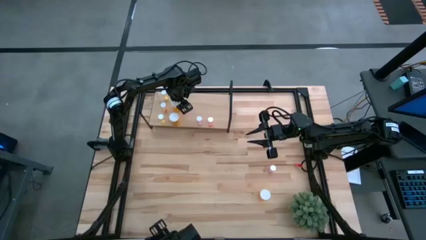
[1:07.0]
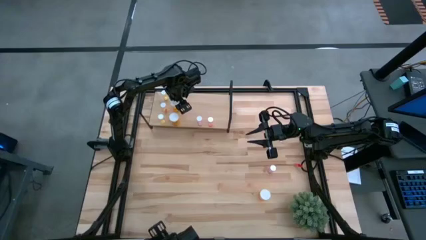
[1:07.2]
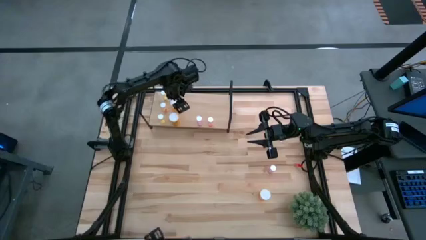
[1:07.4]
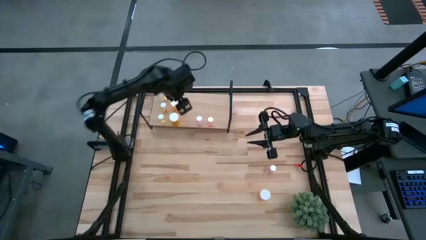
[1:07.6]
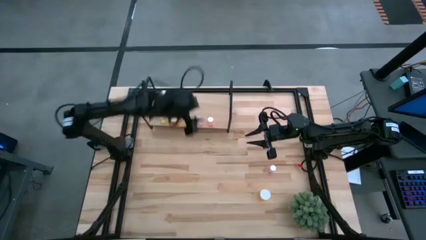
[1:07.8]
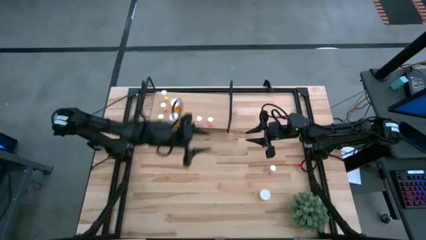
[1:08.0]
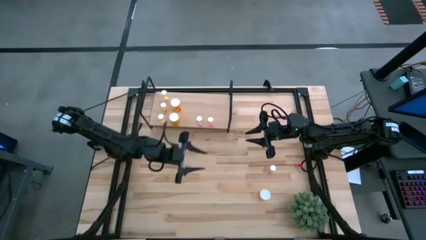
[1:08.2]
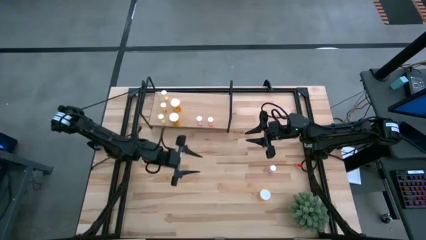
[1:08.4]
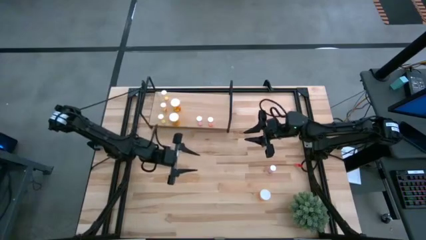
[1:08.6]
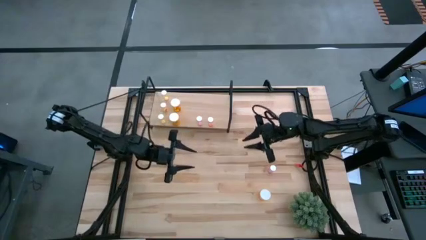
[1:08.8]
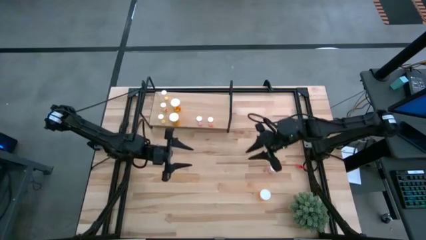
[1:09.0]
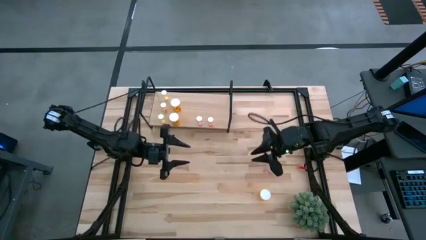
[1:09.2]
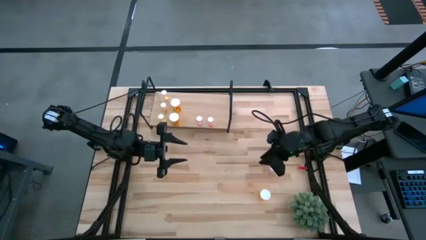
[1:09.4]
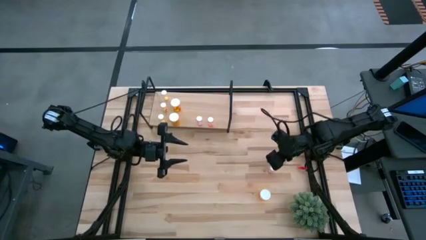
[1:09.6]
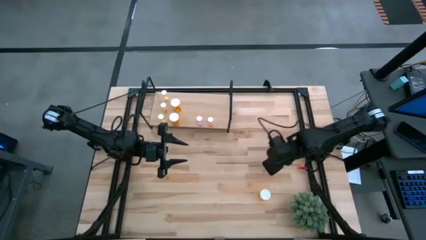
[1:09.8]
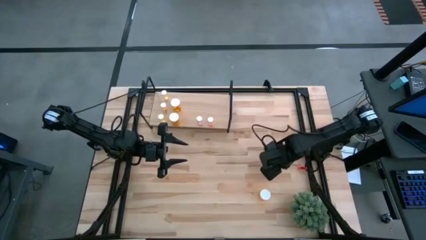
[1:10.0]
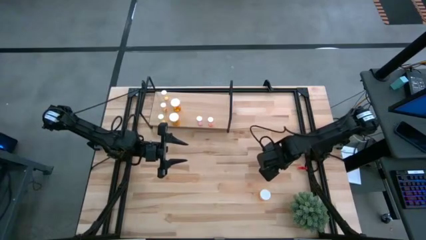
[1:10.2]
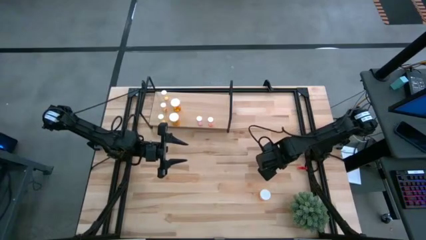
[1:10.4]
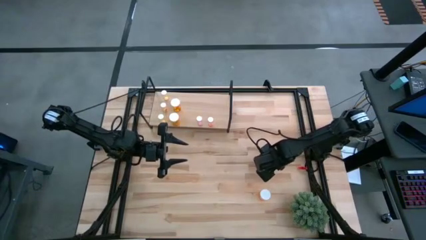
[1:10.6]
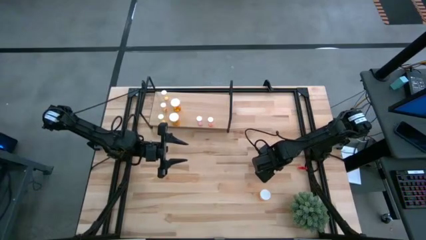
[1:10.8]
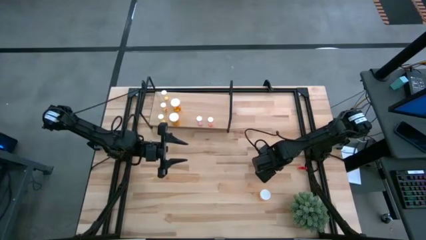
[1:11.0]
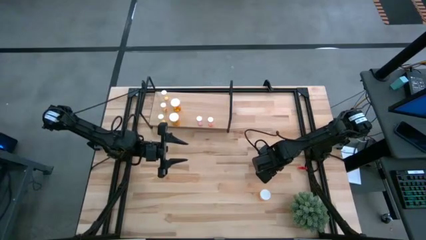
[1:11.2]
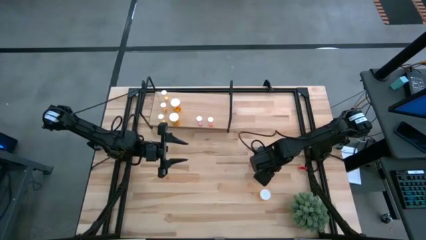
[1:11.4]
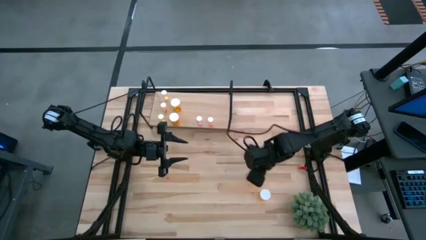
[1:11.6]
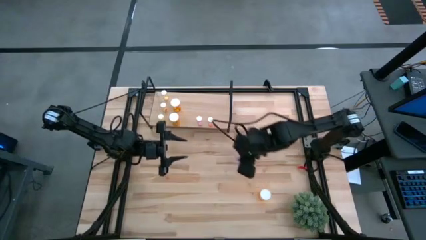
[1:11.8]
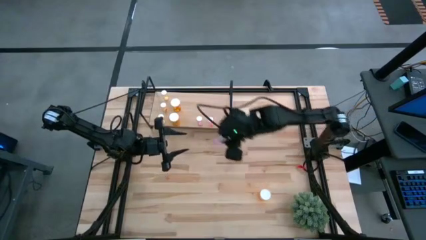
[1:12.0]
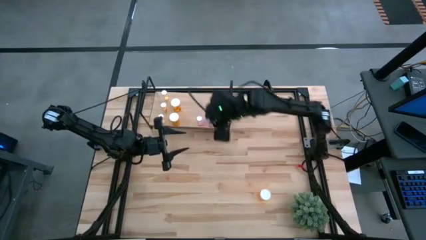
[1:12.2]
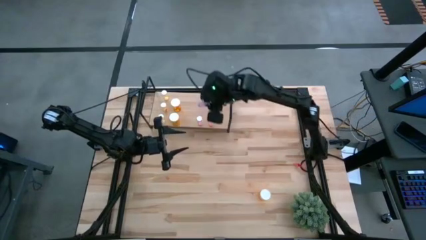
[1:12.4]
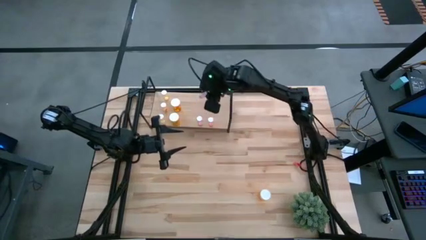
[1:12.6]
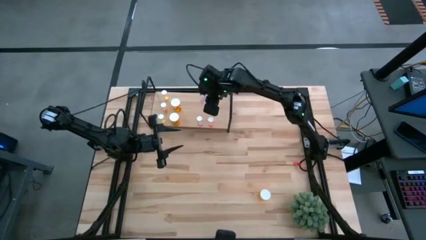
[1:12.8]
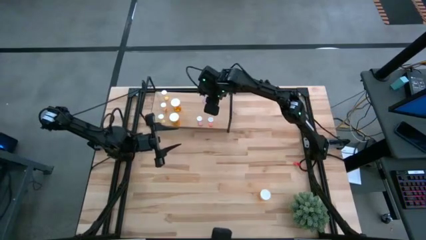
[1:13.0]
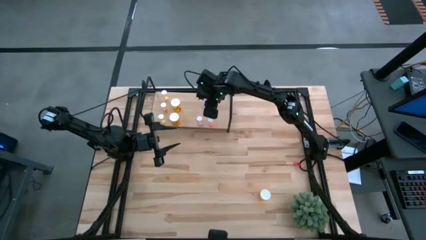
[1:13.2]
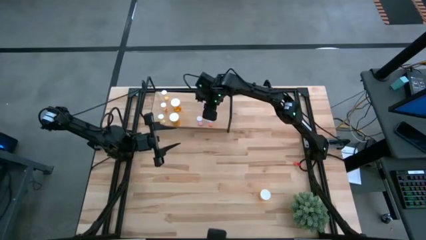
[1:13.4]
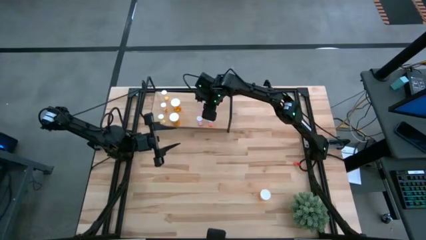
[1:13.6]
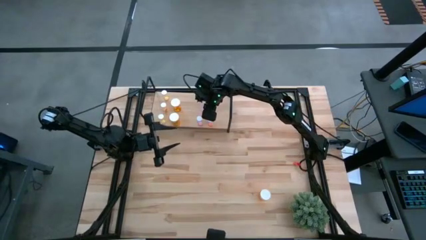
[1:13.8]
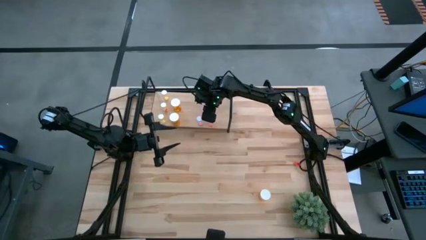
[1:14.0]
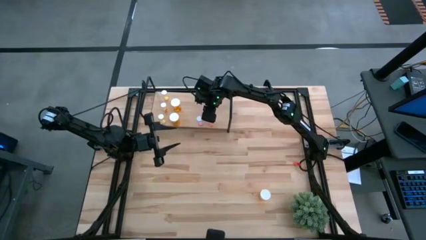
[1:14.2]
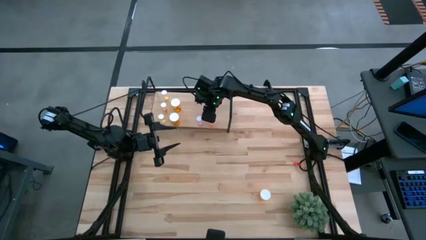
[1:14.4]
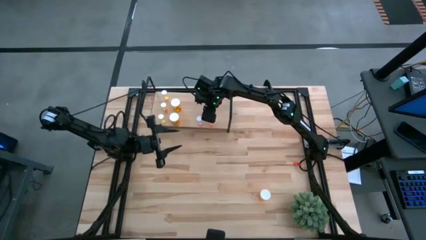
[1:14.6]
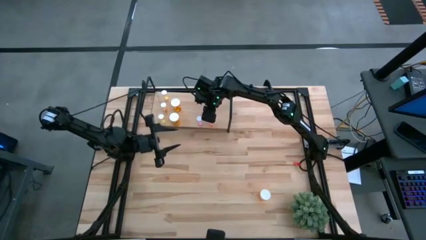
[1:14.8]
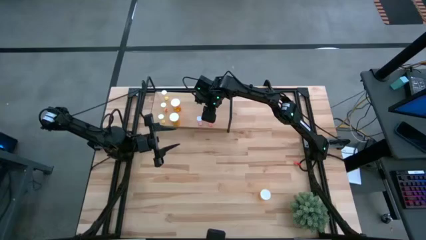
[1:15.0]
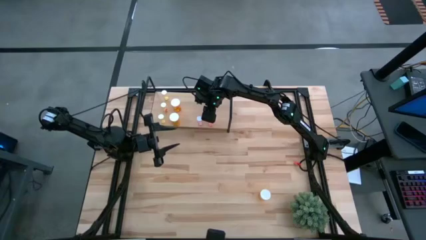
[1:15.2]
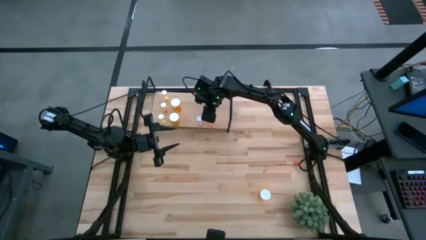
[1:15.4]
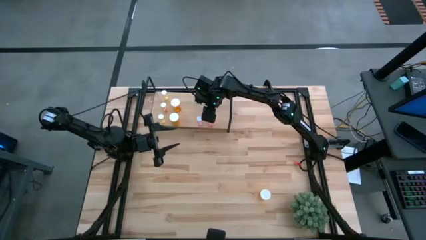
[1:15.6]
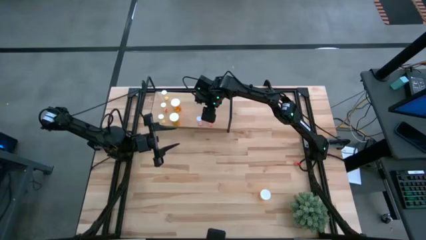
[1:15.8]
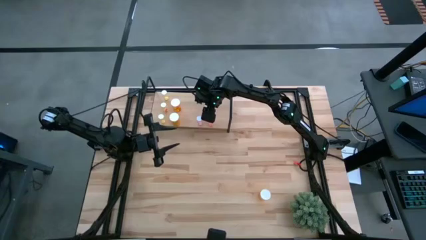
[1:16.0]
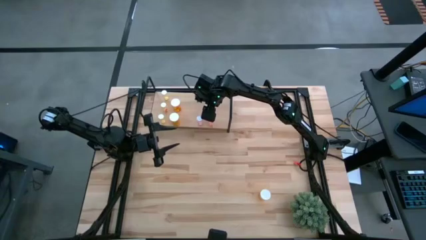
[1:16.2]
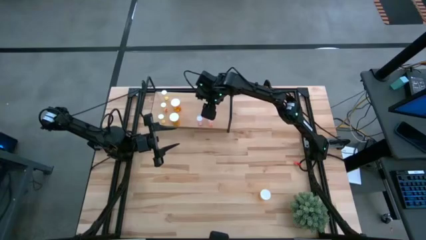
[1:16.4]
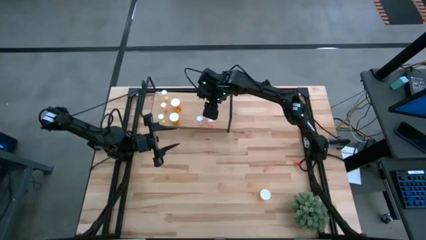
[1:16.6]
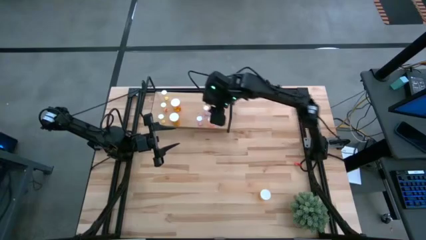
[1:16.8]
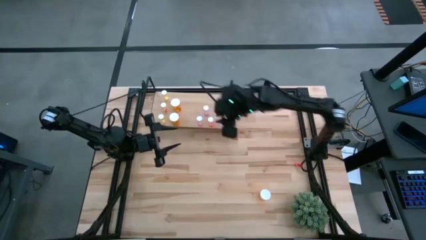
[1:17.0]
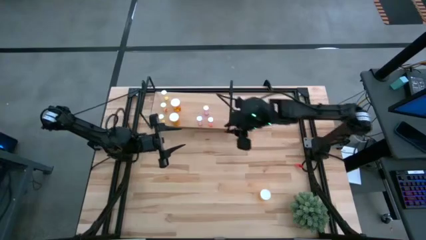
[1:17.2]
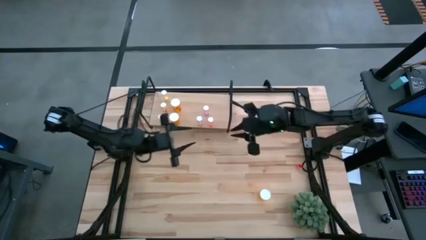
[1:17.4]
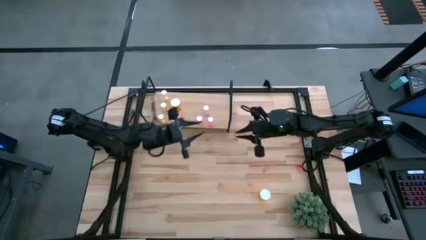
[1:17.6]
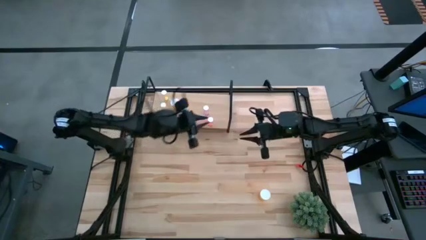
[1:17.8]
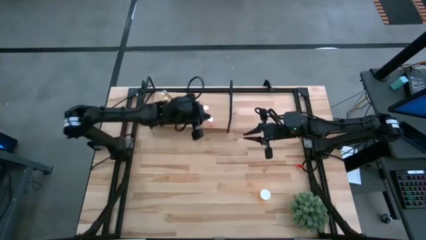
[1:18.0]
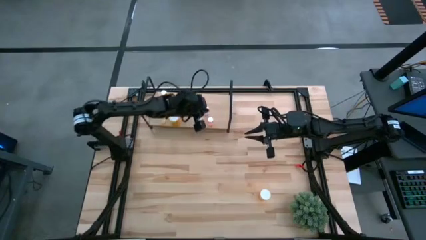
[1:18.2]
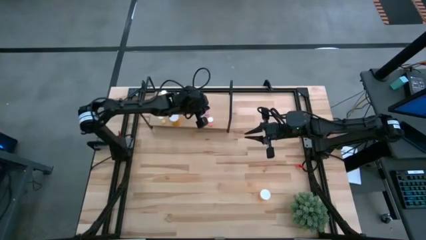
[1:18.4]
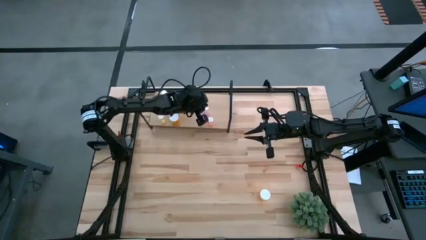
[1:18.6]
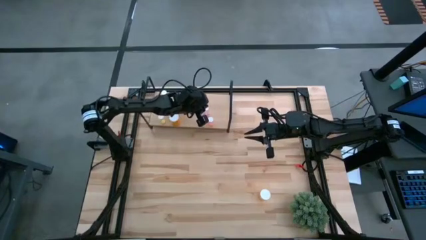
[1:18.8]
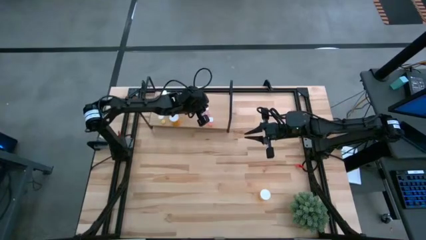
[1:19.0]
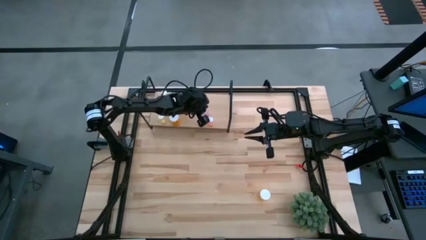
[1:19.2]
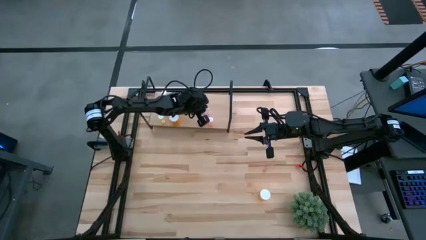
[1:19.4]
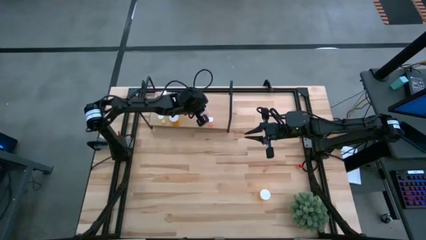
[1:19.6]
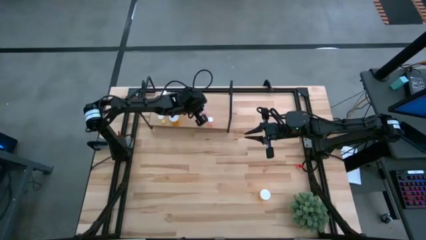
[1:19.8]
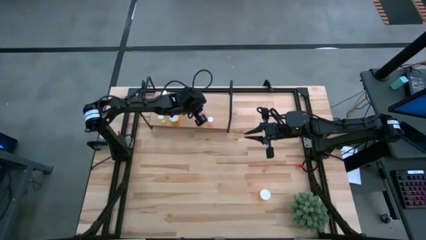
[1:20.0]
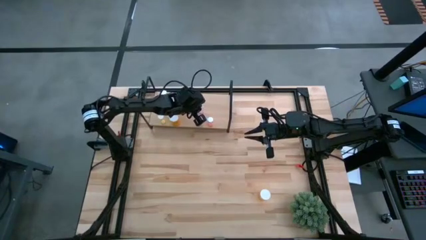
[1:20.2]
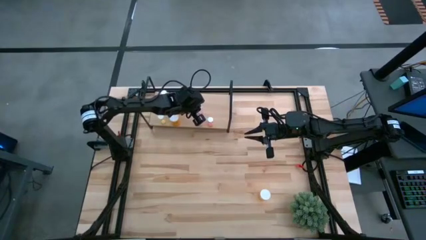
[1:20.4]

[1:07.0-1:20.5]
Task: Pick and place medicine bottles onto shelf by color
Put the purple pill bottle on the shelf to align with the purple pill bottle

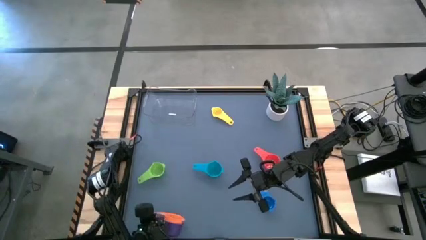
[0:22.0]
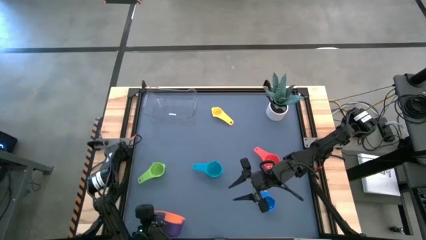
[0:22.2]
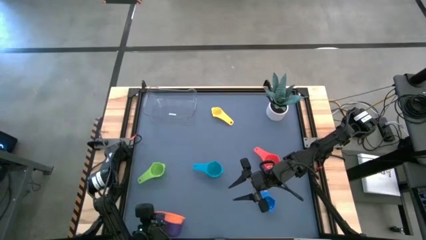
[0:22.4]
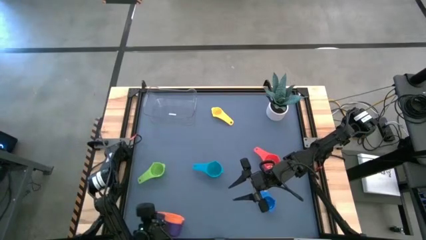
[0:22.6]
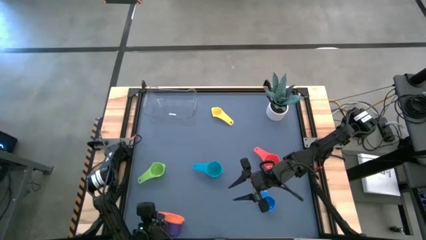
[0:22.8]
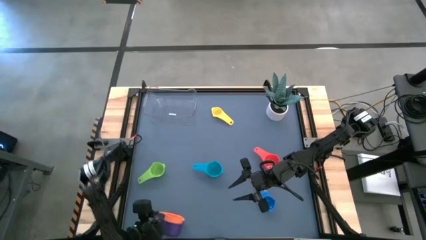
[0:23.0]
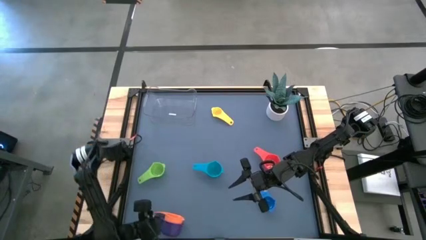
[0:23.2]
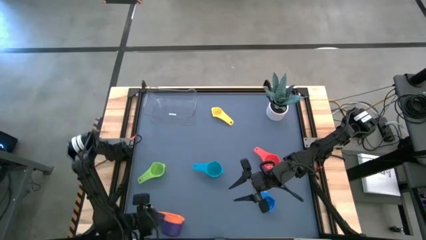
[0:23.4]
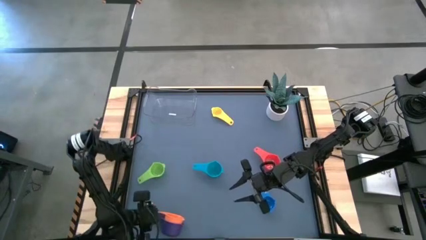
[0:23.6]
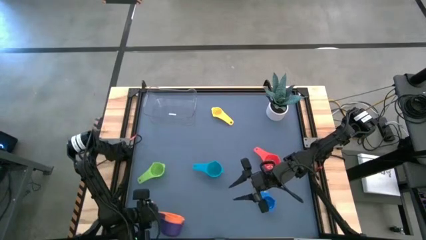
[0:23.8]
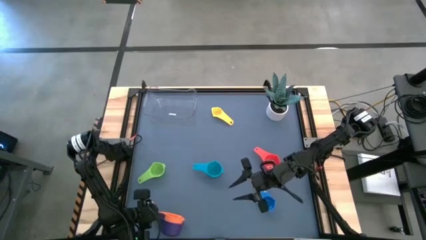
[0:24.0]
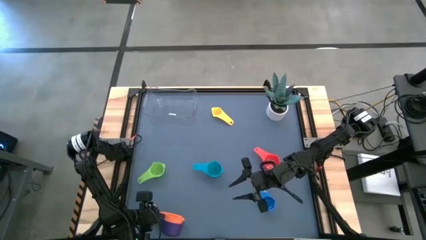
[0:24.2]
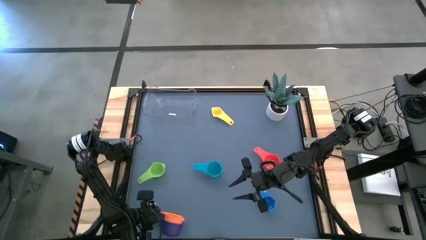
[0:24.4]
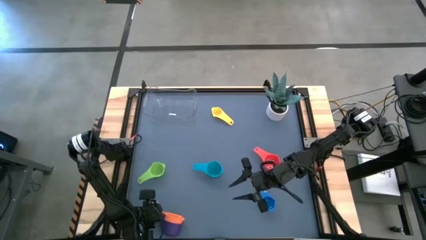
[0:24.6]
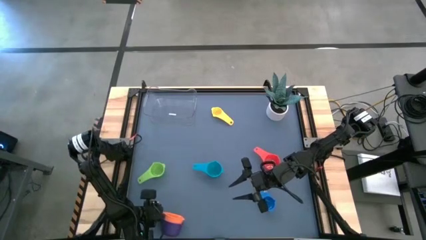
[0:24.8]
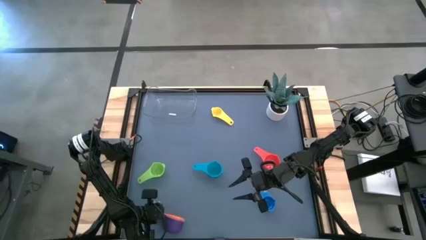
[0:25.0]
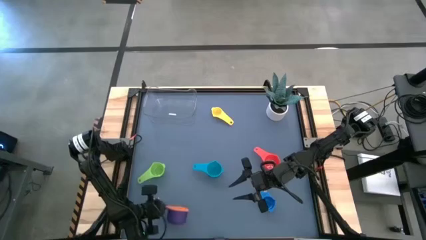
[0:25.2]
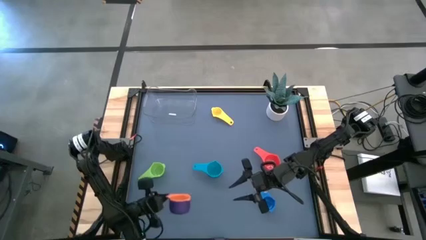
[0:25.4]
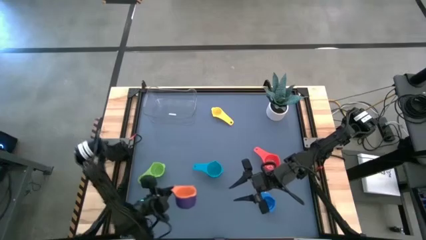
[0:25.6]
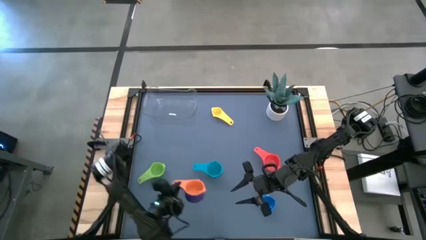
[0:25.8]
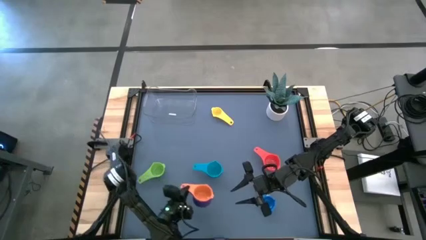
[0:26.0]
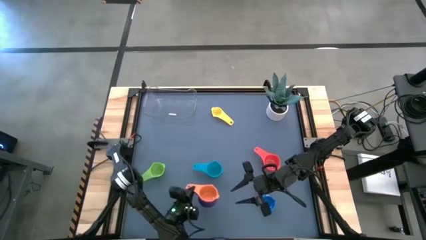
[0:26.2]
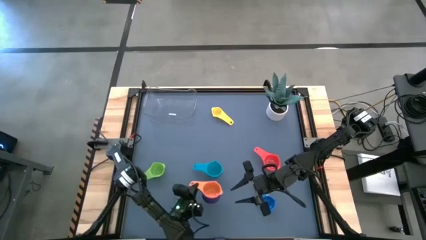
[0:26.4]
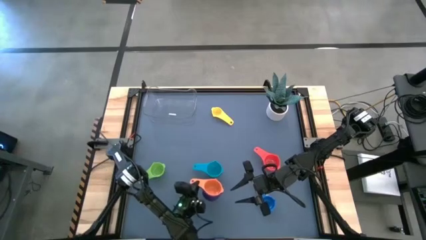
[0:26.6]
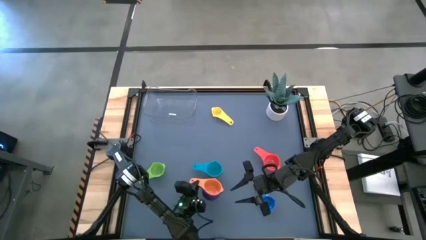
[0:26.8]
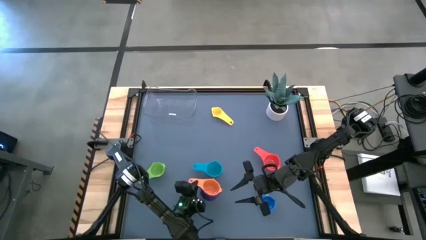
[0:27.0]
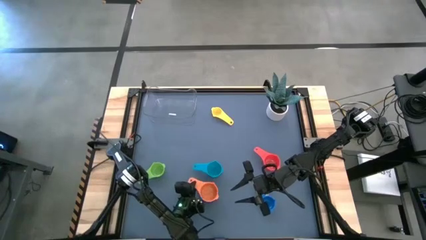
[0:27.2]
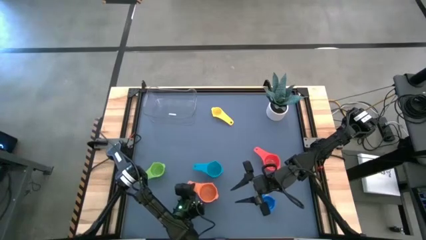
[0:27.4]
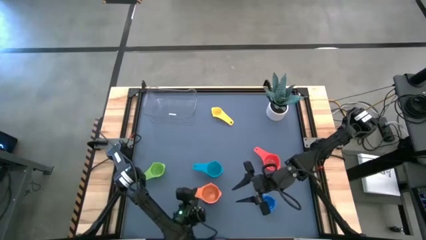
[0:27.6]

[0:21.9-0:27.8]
Task: Nest measuring cups in basket
Move the stacked measuring cups to the middle of the table
